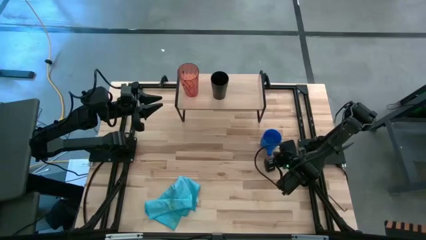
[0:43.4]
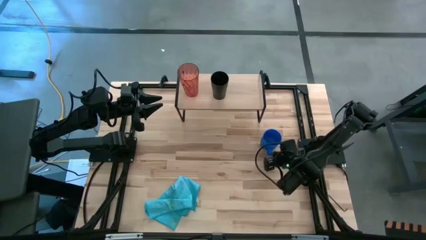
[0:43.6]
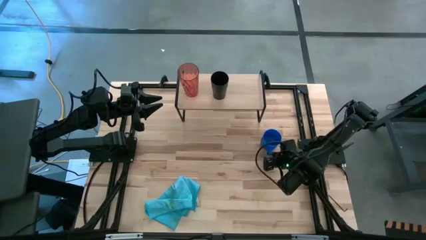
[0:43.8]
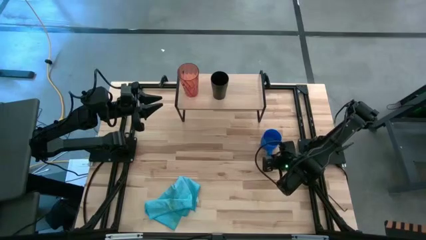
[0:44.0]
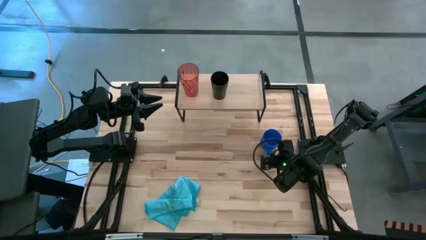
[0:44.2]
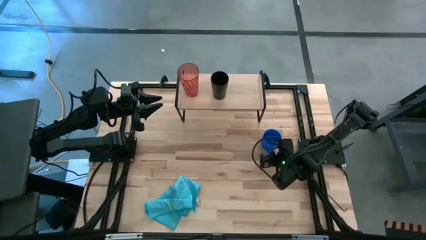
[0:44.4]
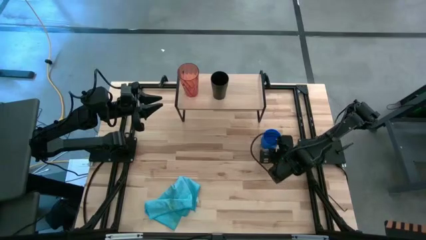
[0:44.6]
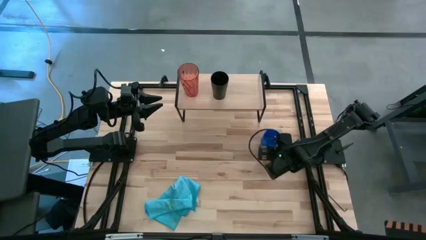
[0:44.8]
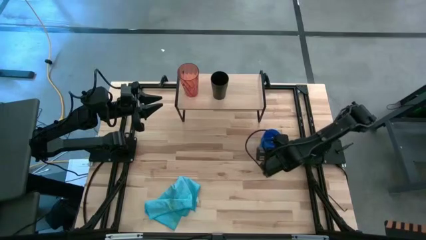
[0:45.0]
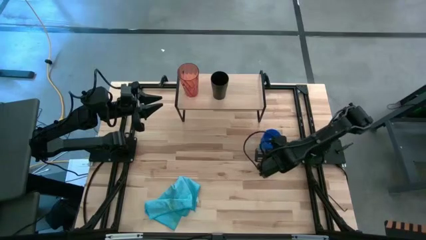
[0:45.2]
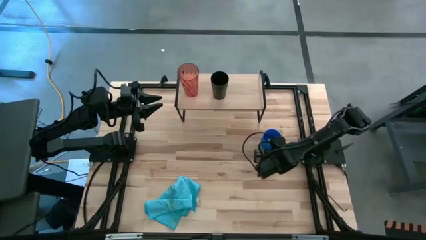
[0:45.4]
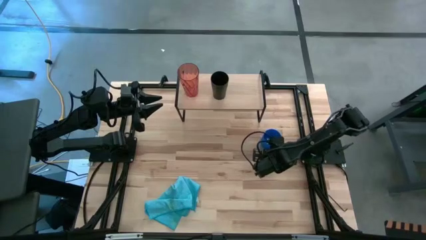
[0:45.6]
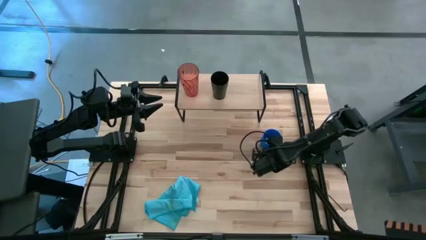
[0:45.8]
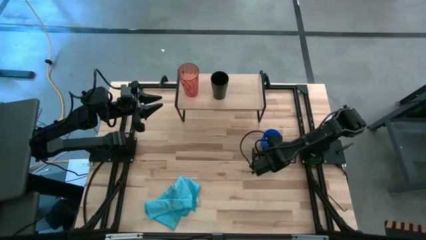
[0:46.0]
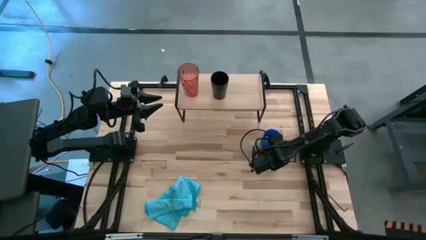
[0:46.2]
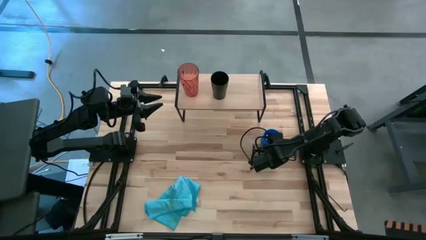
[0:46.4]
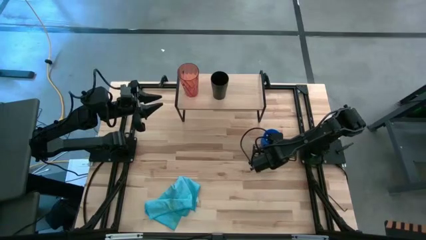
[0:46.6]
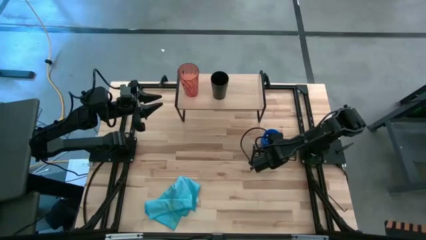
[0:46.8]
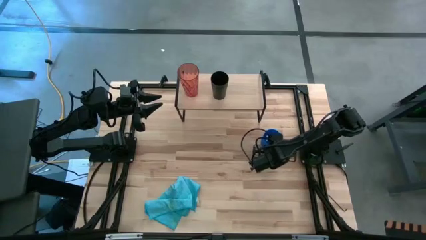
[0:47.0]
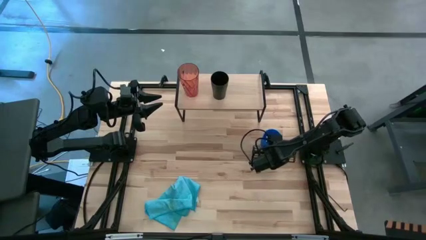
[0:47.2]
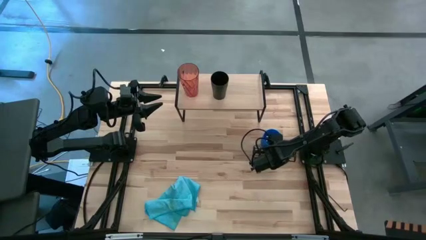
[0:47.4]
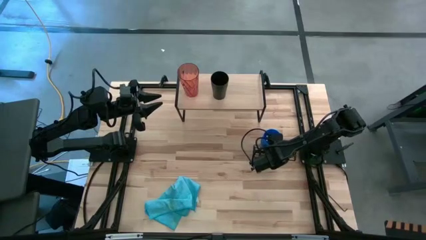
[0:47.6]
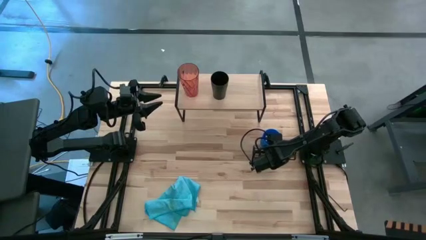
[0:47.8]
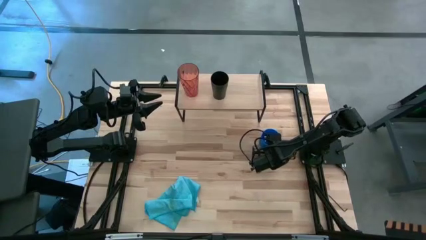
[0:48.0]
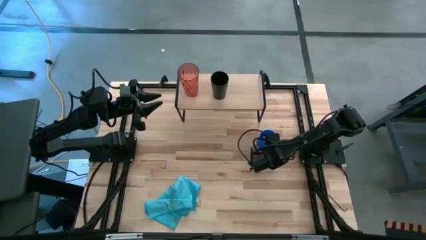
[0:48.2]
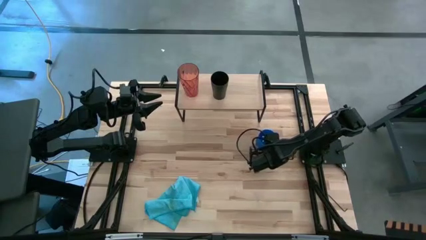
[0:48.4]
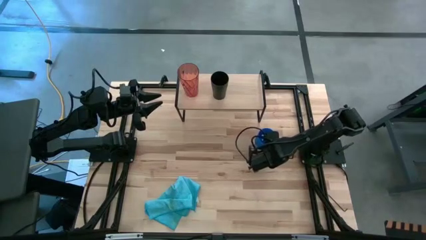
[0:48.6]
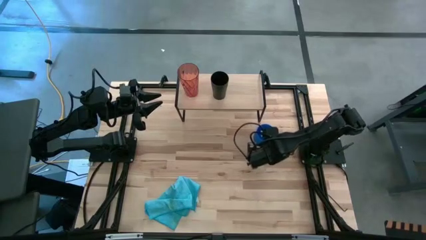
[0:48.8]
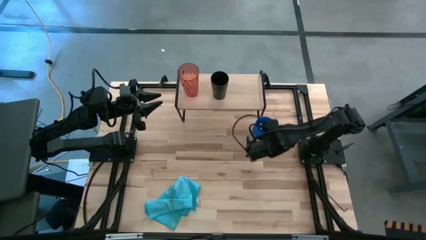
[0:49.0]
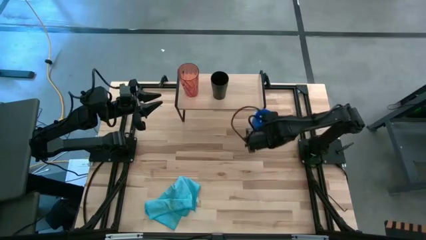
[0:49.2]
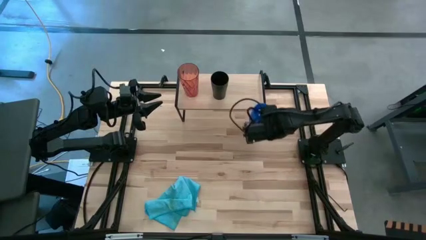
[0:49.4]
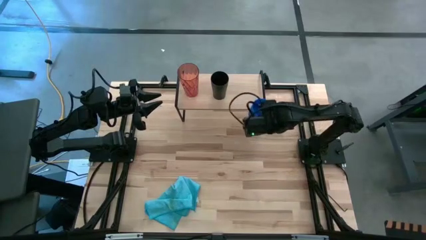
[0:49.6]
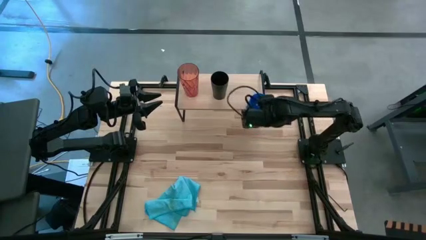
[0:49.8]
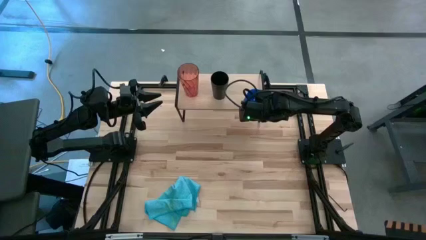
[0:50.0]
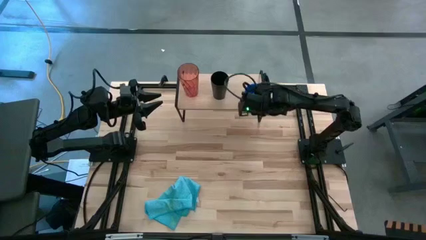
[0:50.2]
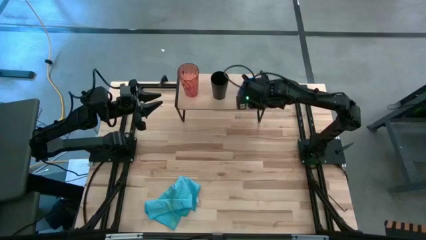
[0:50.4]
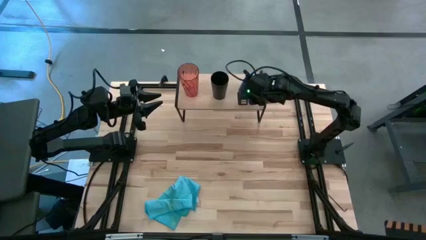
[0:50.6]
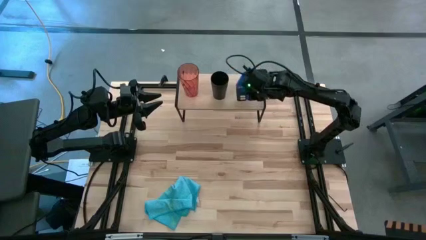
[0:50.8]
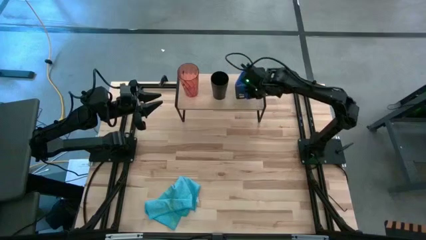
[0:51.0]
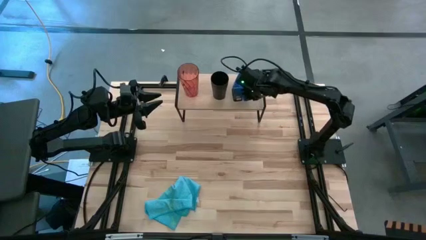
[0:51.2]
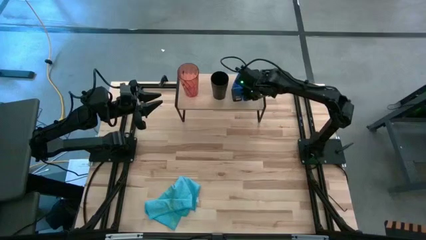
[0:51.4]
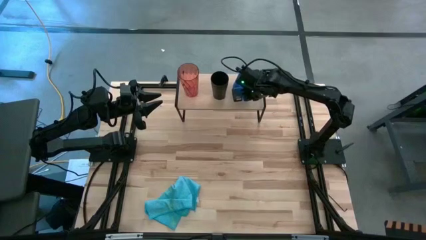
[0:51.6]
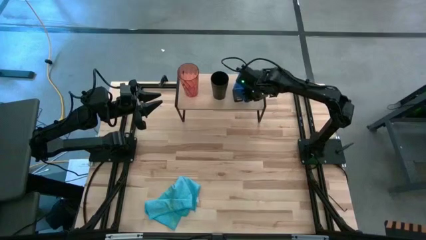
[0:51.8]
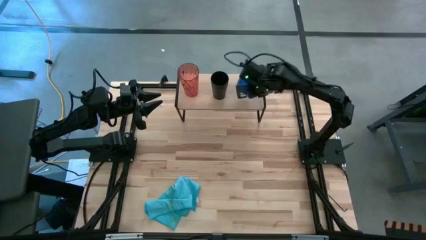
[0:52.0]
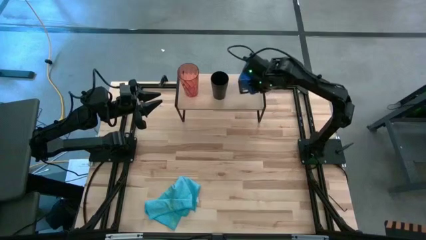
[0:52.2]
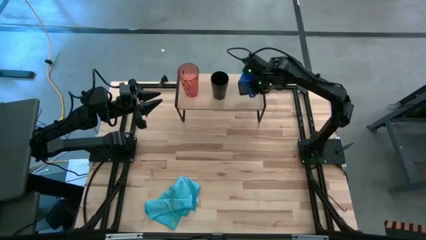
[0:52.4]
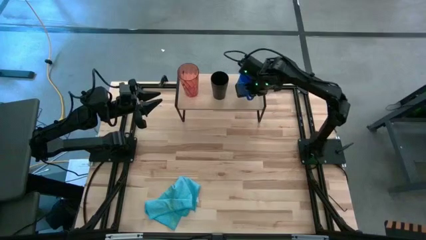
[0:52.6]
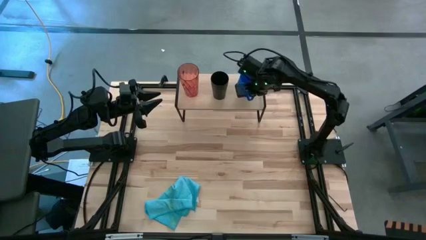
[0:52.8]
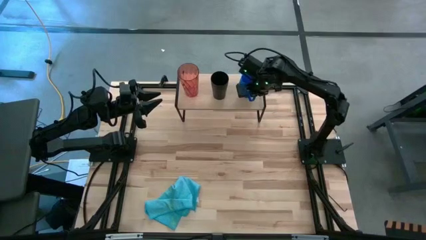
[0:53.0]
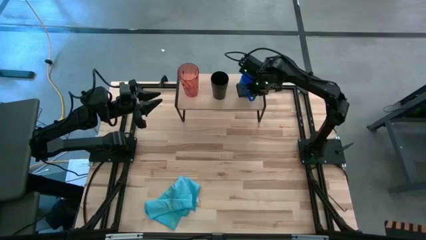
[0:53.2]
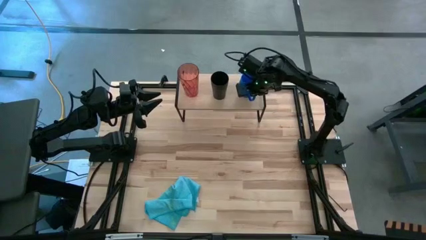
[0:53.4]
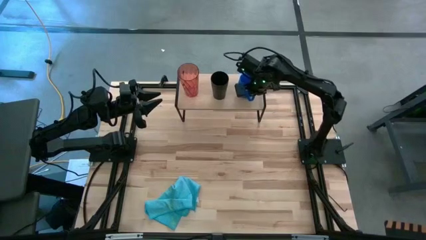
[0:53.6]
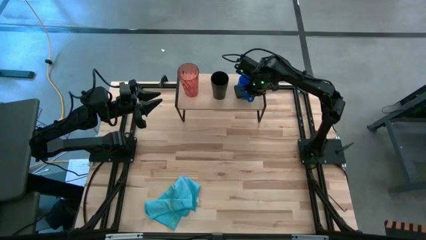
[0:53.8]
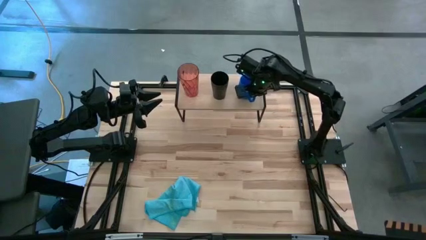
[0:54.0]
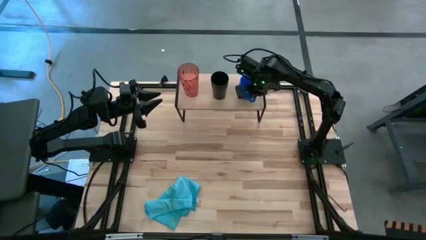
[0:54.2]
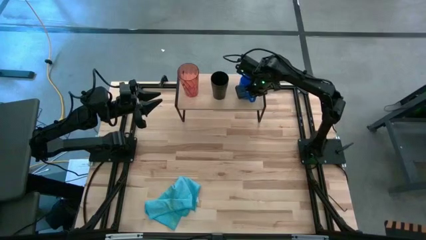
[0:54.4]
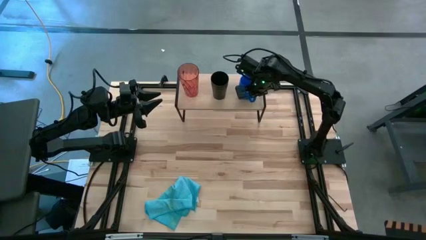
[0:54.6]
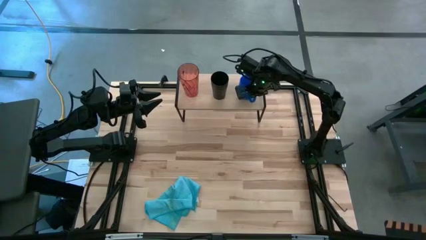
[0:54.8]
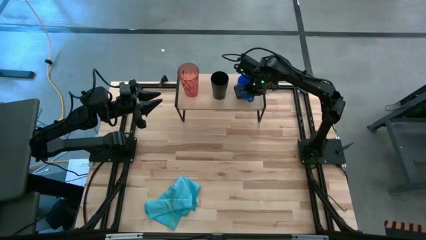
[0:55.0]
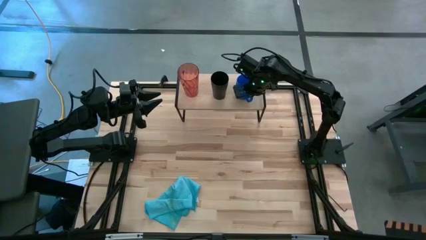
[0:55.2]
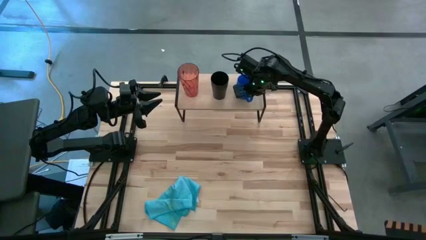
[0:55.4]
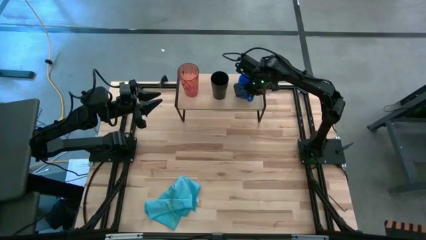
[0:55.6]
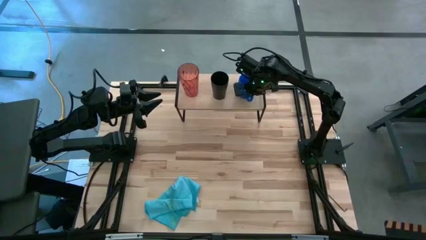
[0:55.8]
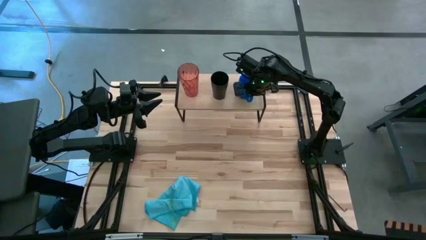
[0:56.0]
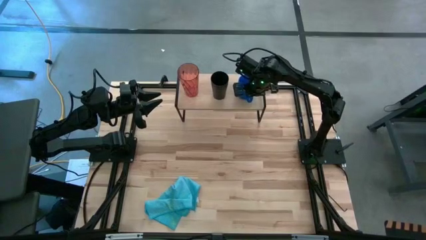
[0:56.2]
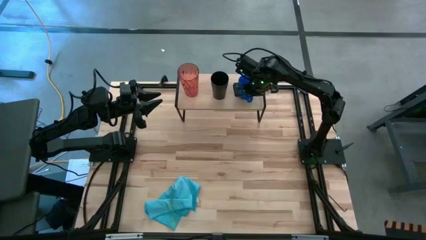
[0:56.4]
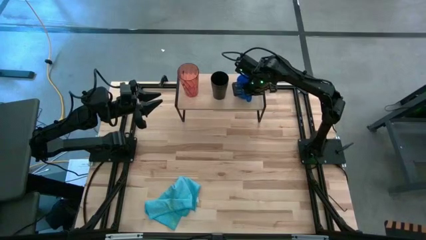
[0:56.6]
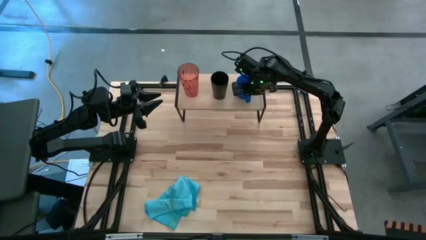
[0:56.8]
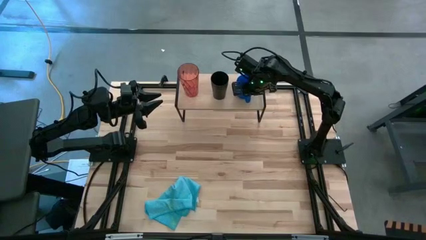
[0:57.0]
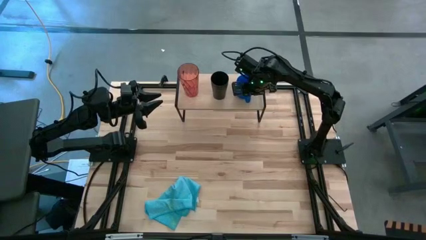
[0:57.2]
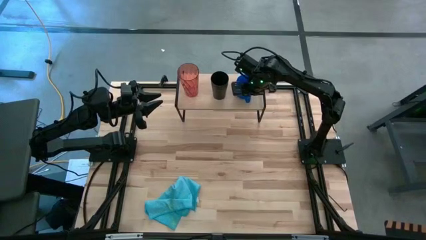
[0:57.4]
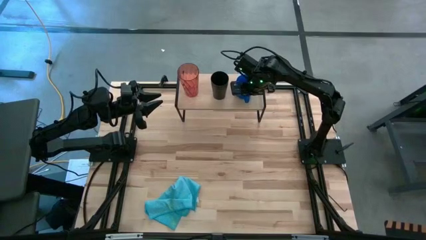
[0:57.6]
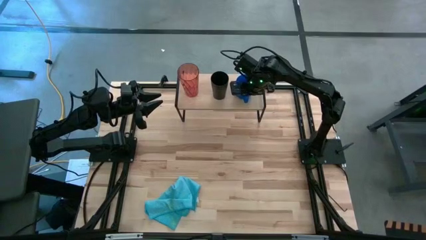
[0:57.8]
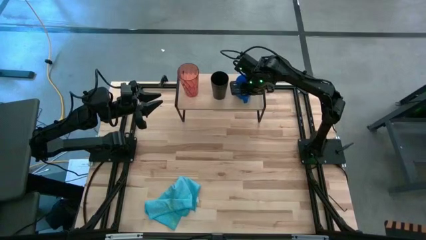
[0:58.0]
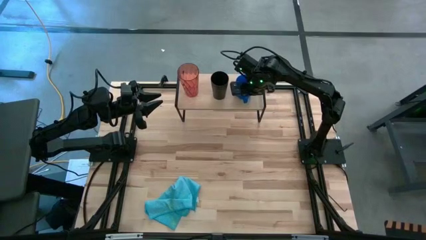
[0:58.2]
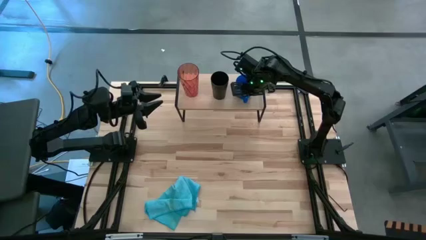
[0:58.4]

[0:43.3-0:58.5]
Task: Stack small to large cups/mugs on shelf
Put the blue mug on the shelf
